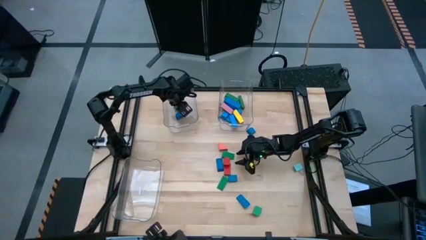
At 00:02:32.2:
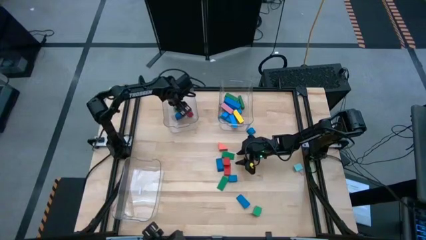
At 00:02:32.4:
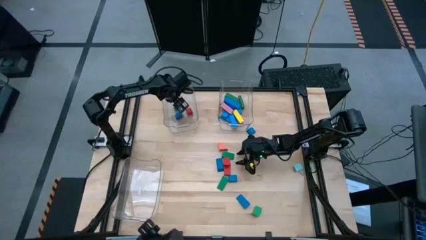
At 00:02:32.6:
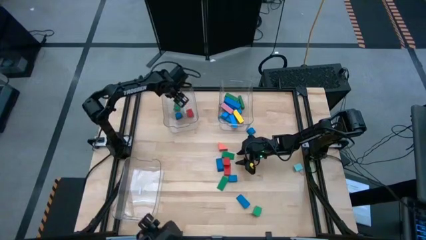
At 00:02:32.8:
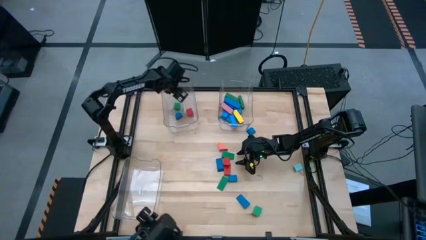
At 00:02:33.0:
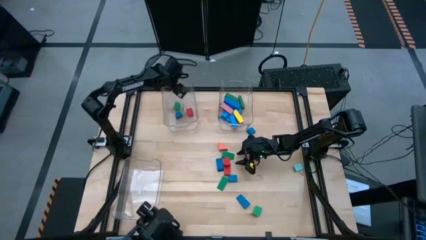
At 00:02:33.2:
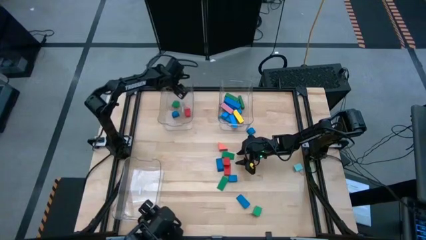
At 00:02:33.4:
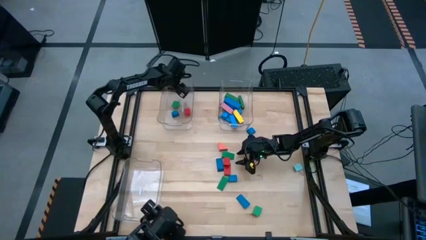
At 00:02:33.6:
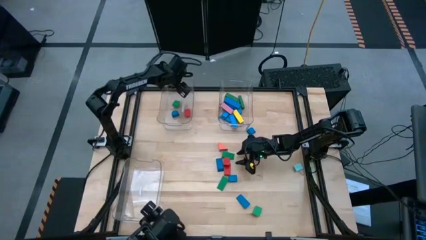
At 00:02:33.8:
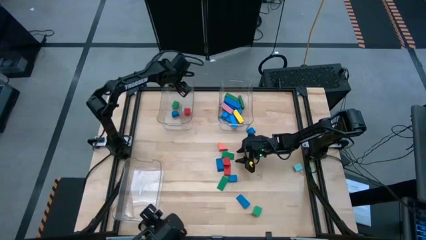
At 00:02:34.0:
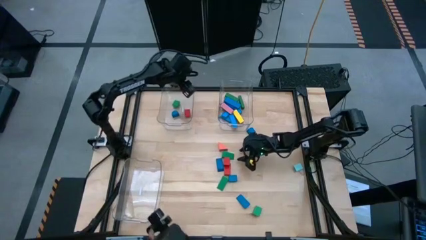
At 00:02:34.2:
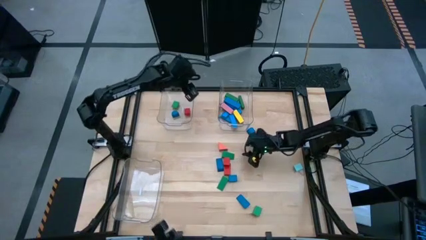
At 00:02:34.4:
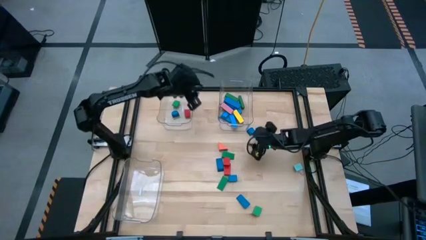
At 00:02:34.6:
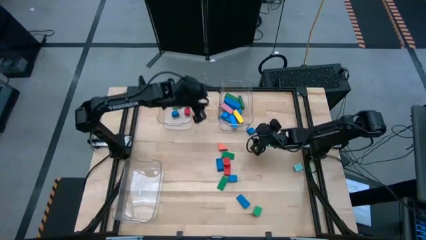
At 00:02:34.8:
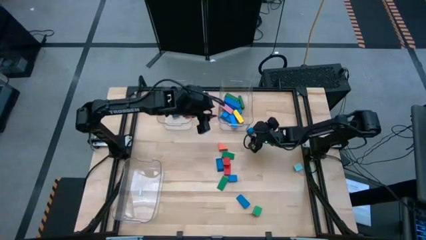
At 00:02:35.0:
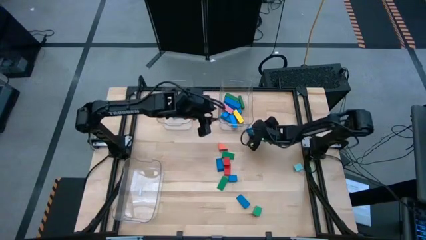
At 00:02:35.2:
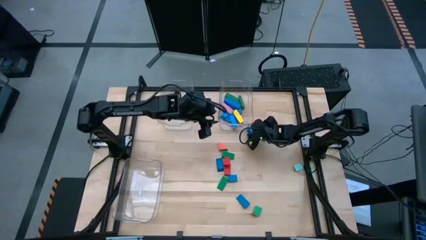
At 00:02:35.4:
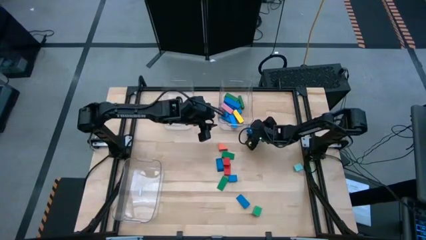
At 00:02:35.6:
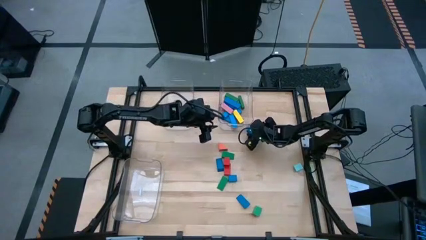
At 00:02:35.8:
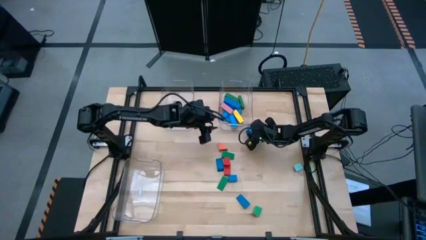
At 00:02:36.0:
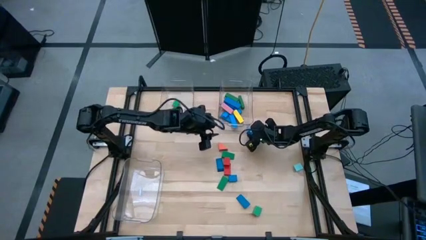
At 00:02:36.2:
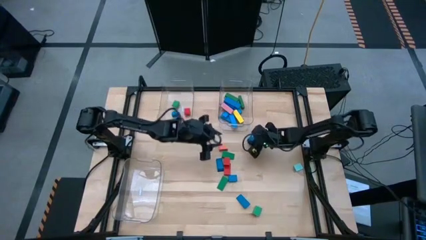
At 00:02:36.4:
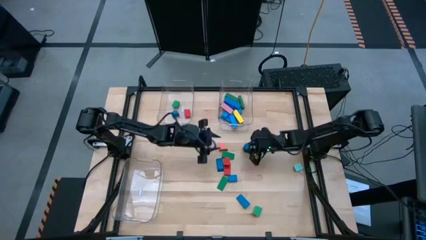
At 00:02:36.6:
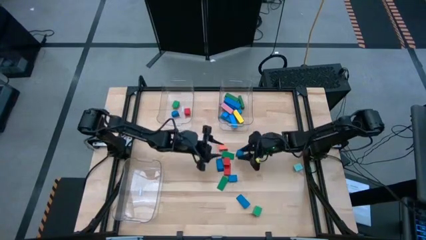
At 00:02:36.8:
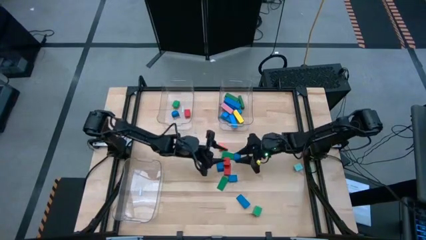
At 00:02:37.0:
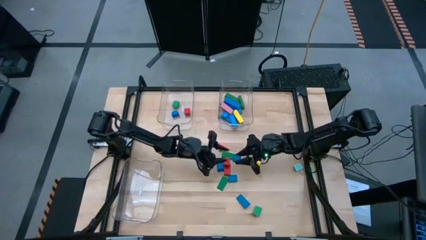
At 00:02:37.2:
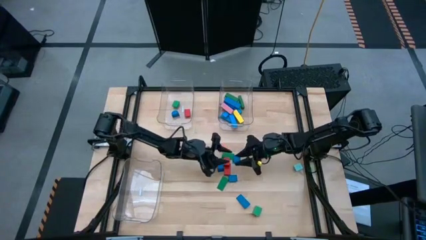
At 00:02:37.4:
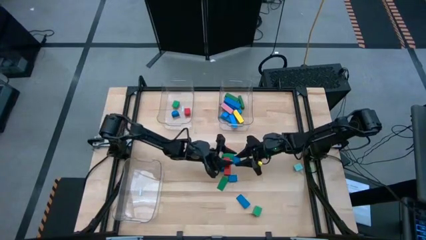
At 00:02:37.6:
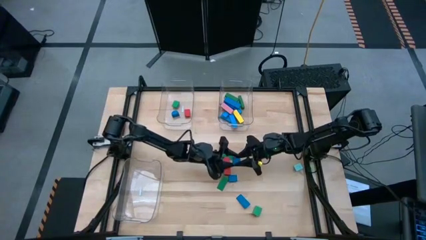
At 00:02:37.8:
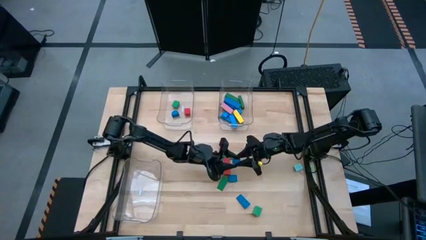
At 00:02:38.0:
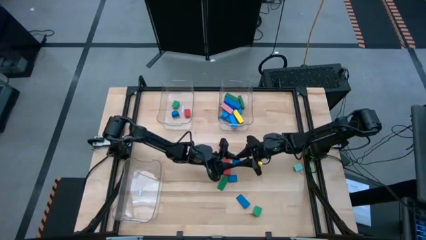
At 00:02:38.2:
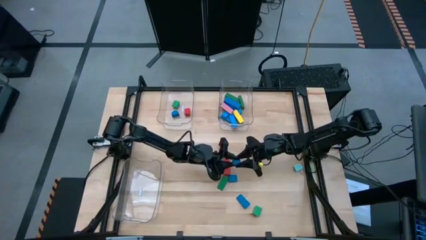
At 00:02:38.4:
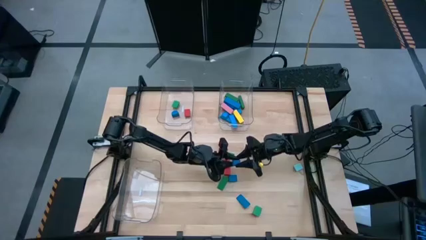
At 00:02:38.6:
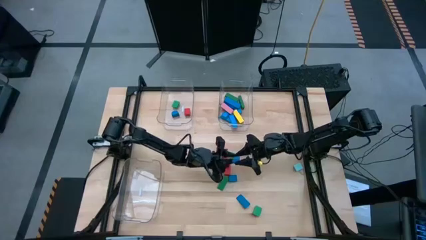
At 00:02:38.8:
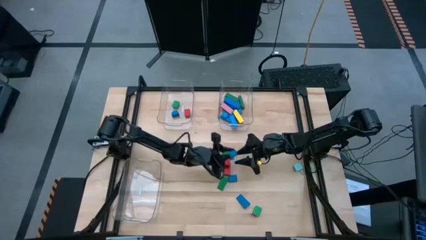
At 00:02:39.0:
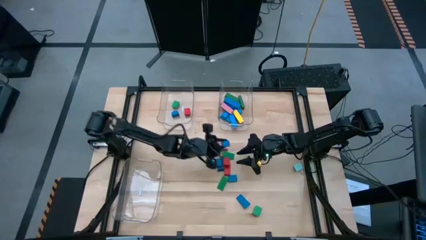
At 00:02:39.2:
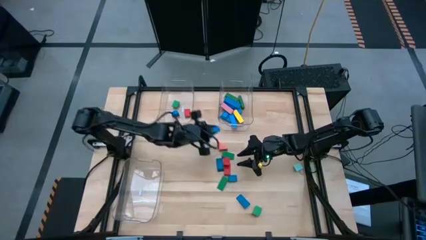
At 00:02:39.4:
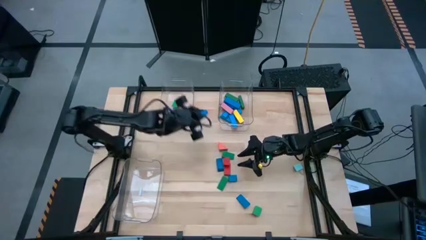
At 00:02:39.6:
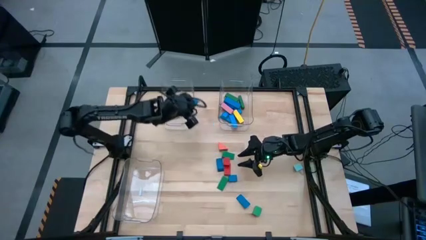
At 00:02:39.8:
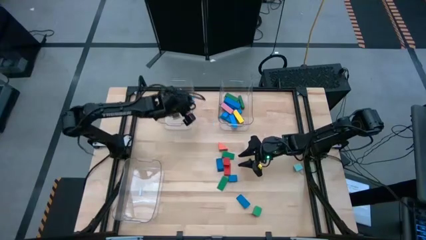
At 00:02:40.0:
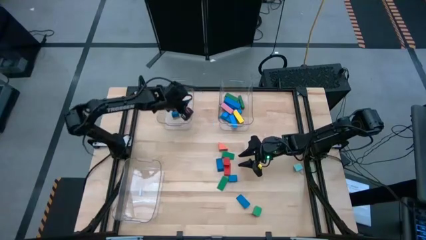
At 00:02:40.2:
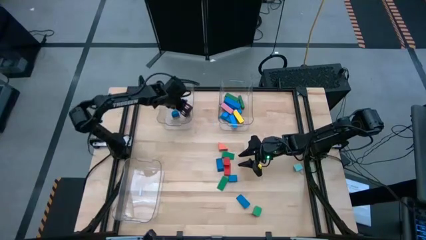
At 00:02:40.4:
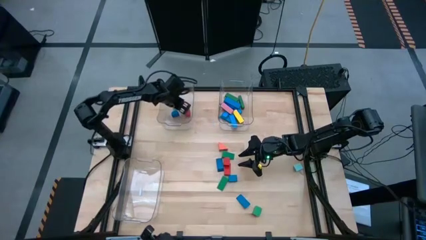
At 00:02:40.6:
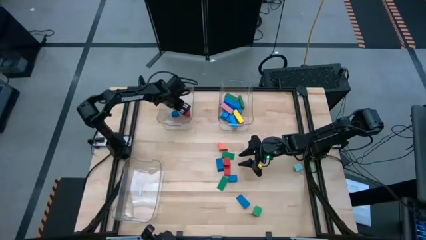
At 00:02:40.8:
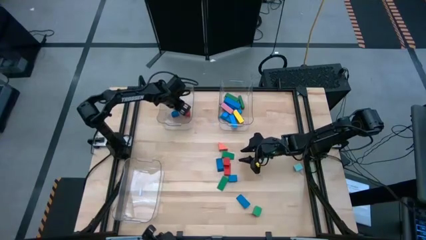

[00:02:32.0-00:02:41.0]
Task: Sort blocks by size
Put the blue half cylinder block into the top left transparent bin

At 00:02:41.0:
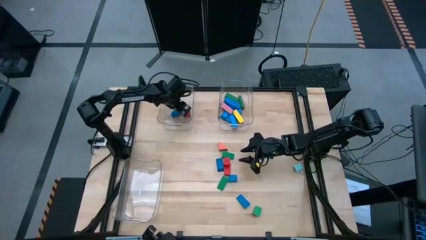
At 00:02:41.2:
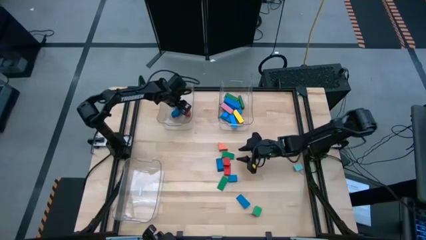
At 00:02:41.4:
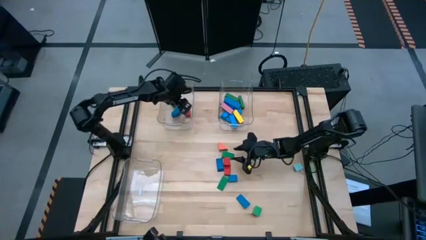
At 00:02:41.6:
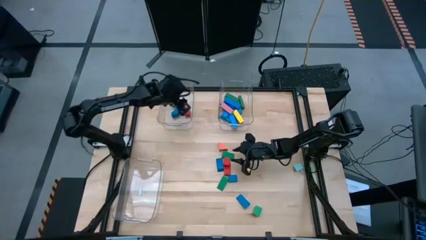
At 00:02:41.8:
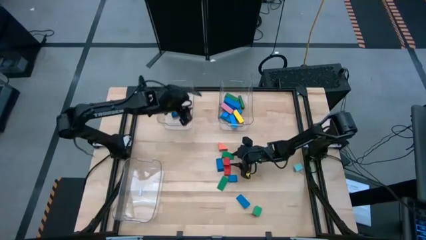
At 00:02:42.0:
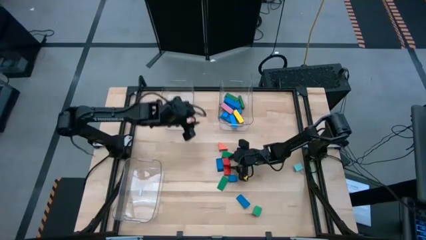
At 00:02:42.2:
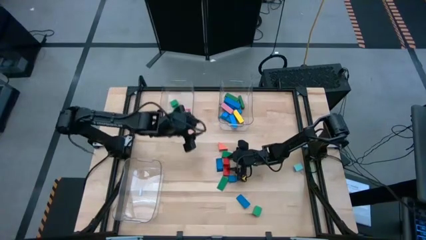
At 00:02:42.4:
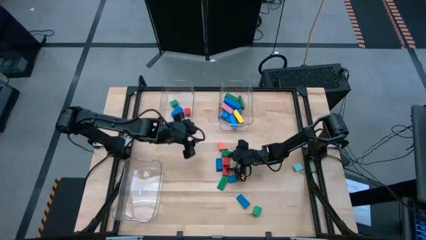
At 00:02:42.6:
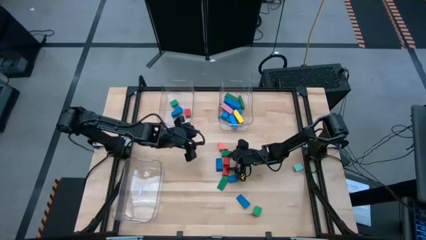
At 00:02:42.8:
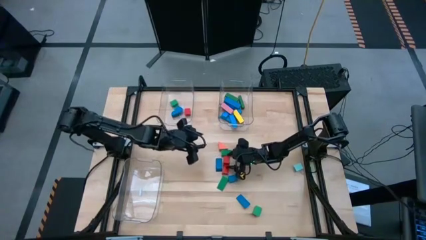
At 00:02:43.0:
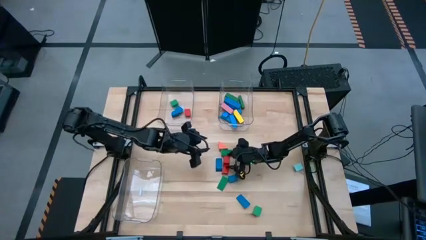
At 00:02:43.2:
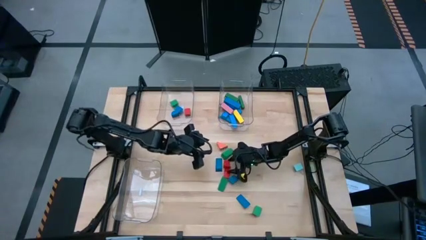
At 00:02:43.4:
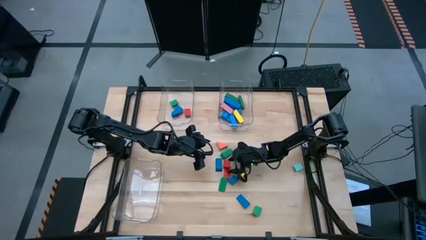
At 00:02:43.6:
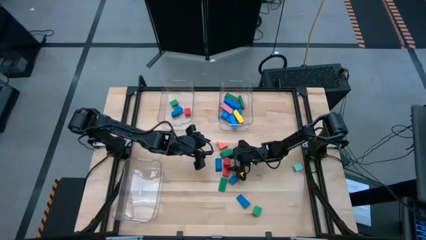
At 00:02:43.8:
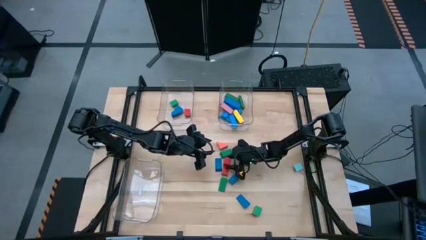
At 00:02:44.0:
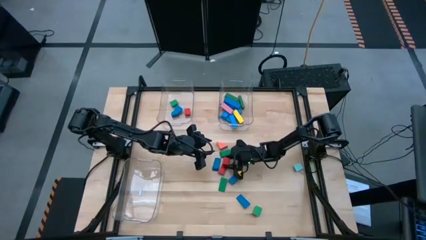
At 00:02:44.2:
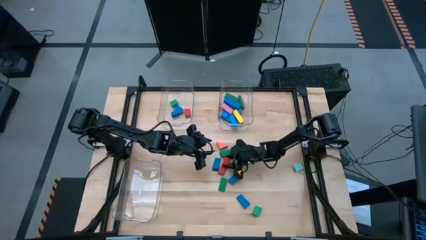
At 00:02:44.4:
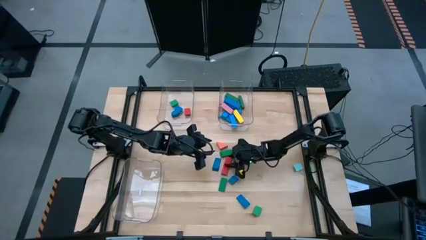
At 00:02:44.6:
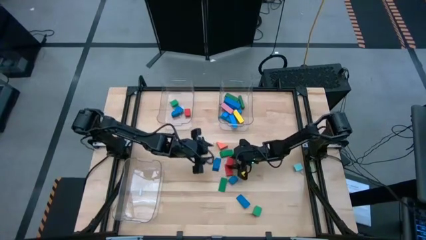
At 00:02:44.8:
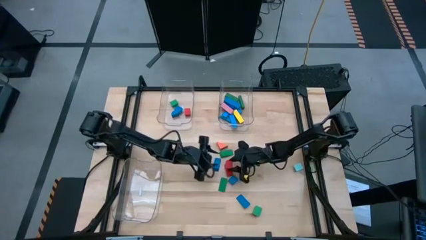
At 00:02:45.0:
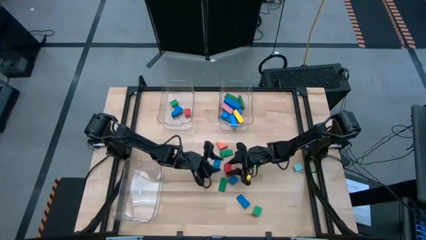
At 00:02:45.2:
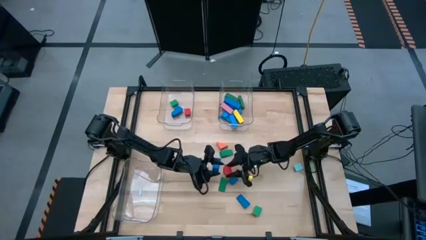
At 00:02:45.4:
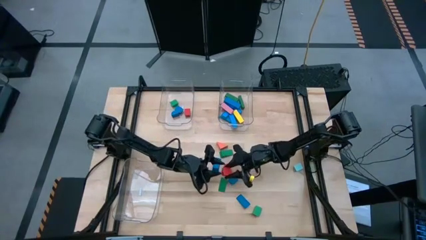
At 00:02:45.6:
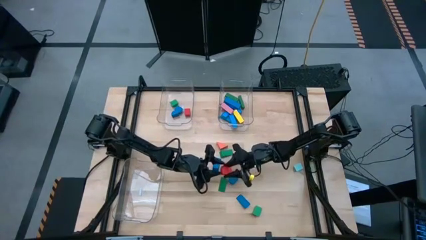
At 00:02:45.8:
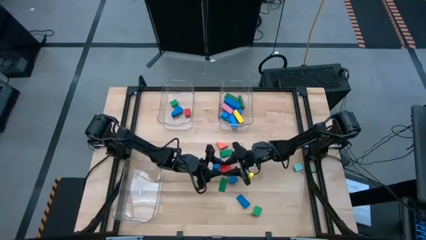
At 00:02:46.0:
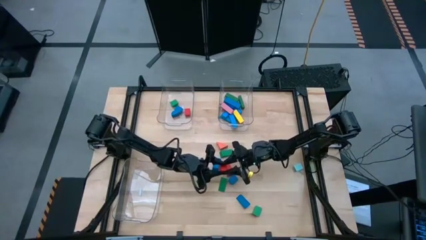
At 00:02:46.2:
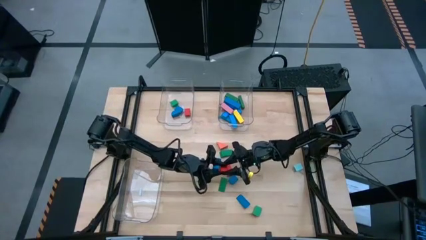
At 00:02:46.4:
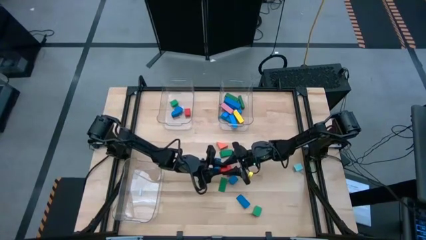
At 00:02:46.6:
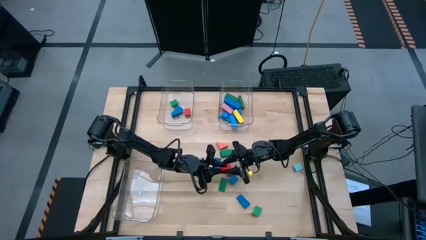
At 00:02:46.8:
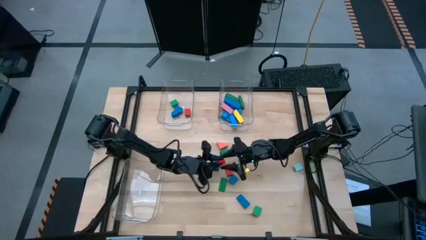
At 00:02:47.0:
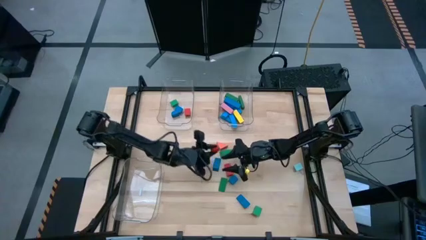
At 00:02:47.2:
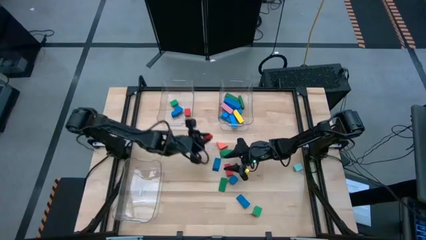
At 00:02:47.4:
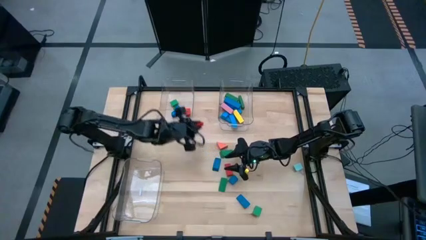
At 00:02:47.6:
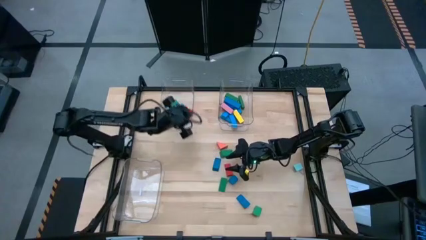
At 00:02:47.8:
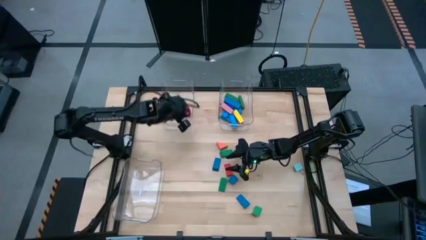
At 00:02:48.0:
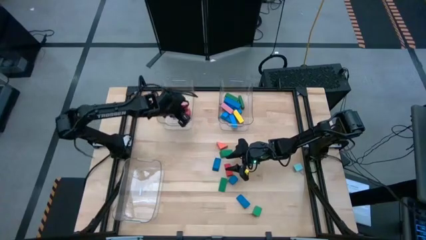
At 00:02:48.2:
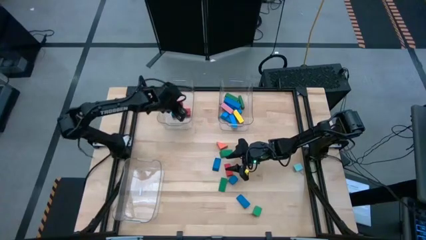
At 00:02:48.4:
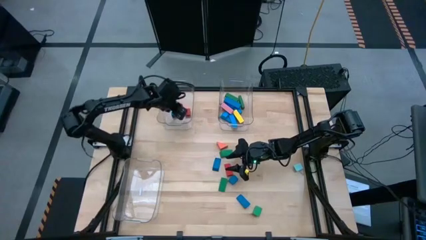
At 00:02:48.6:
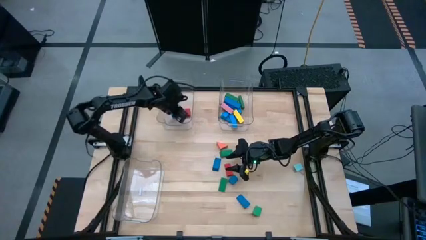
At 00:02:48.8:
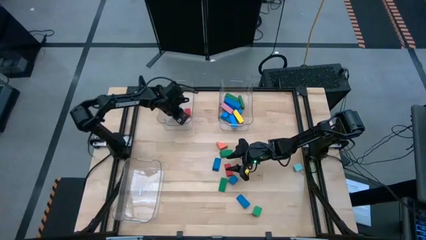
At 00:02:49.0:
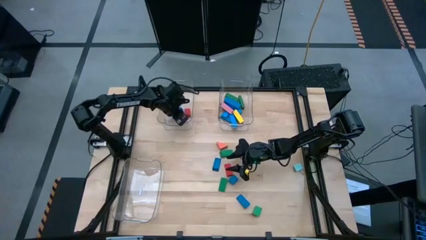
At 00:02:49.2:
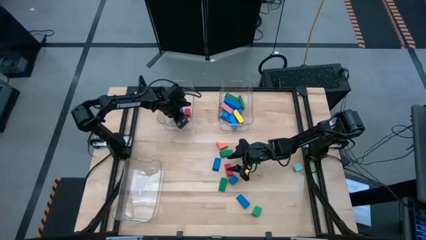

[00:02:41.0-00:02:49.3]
Put the red half cylinder block into the top left transparent bin
